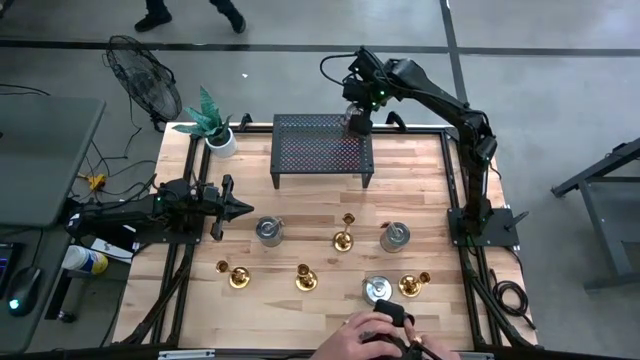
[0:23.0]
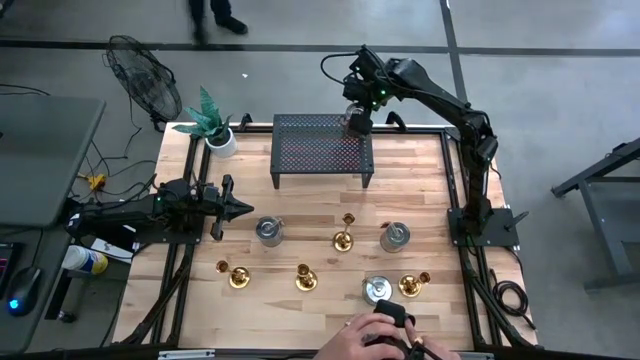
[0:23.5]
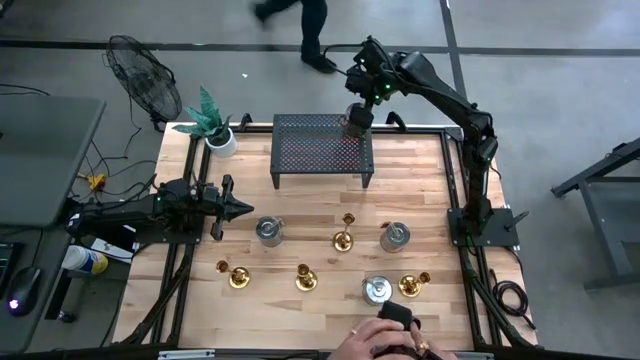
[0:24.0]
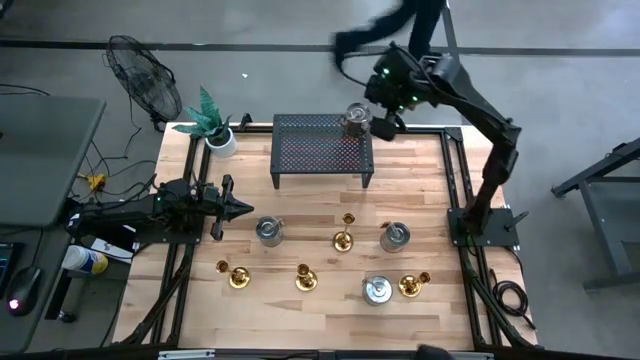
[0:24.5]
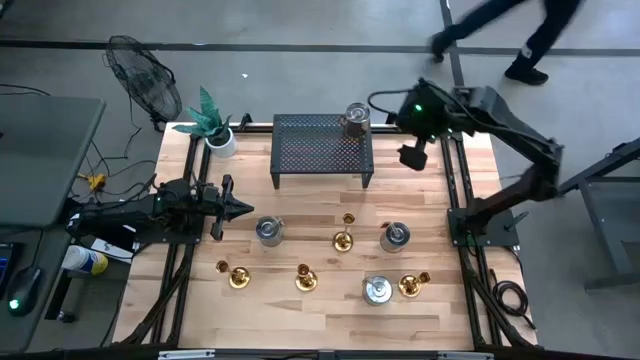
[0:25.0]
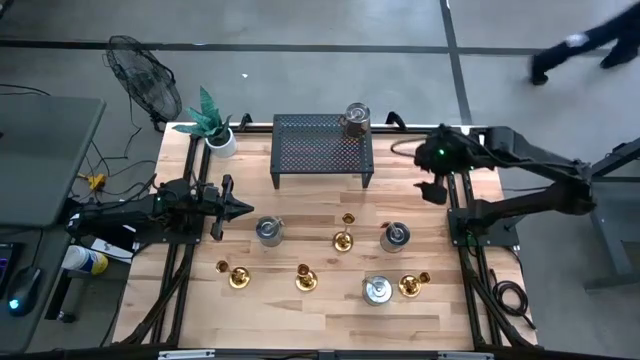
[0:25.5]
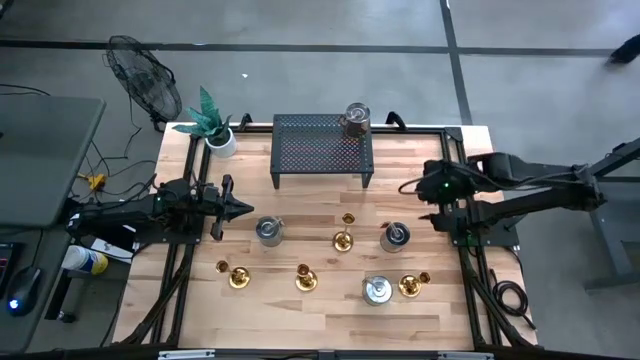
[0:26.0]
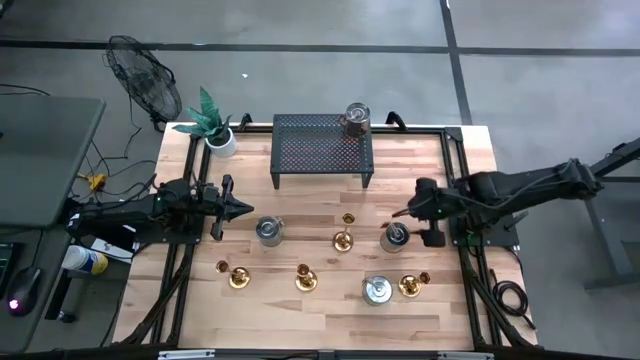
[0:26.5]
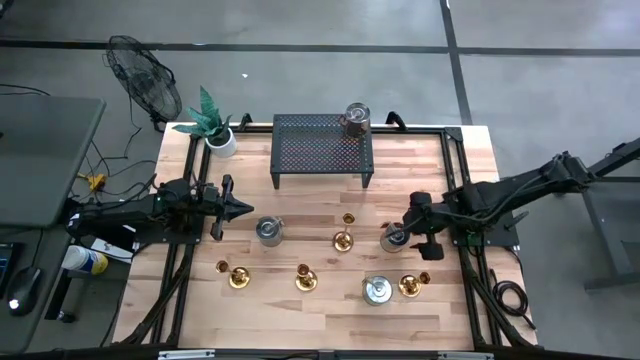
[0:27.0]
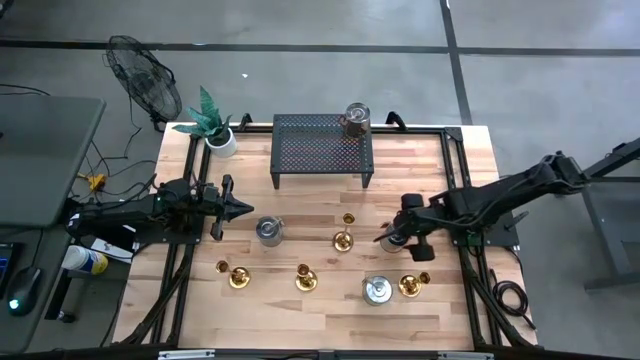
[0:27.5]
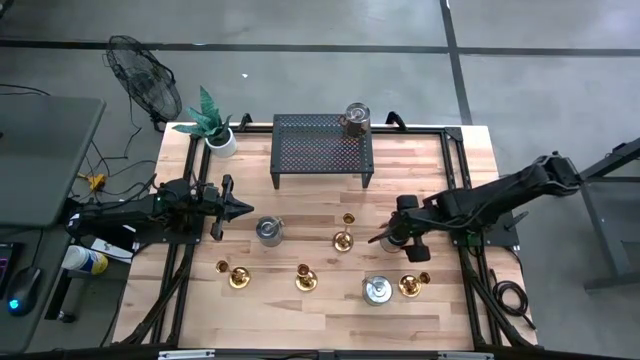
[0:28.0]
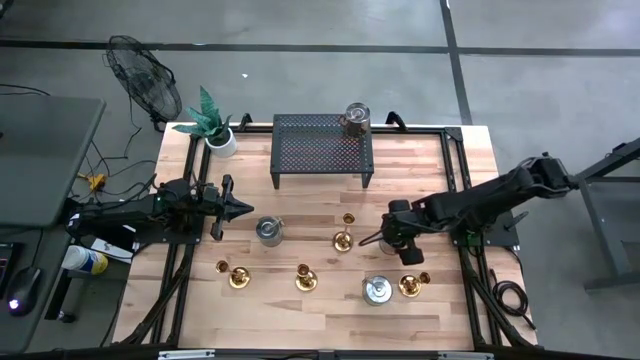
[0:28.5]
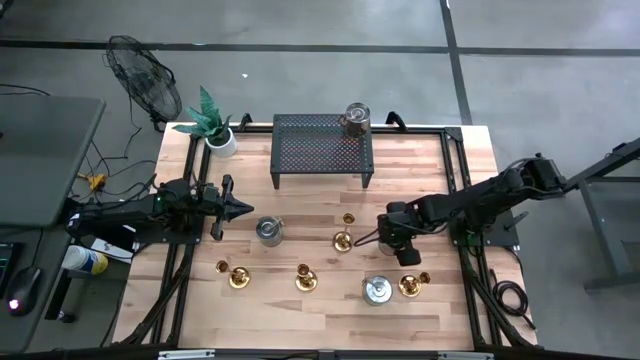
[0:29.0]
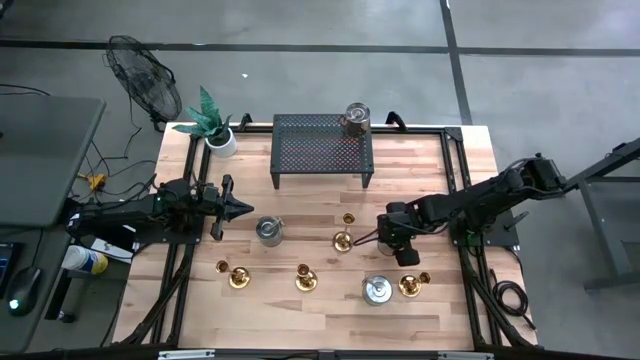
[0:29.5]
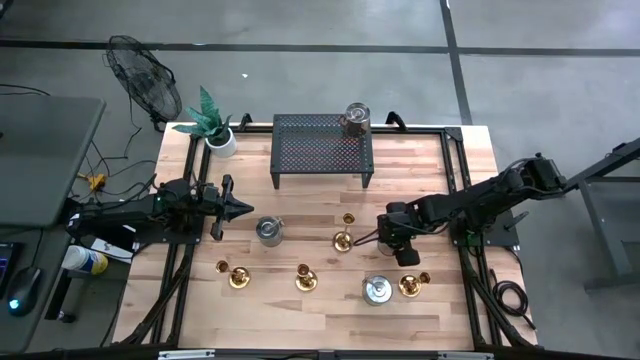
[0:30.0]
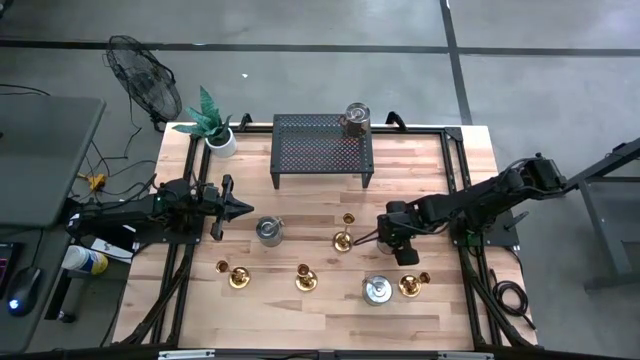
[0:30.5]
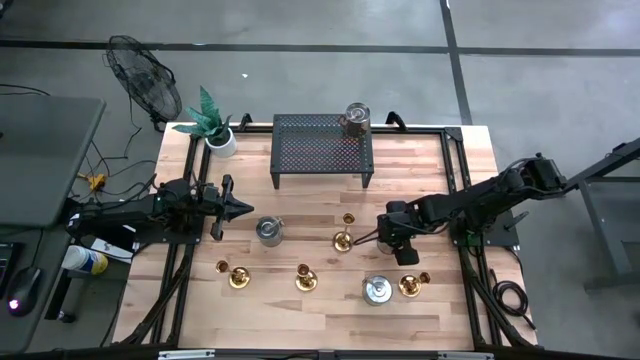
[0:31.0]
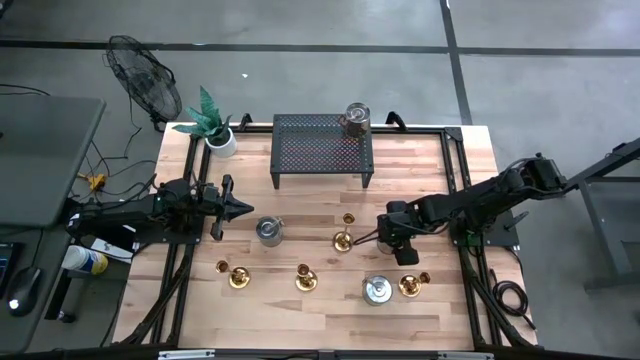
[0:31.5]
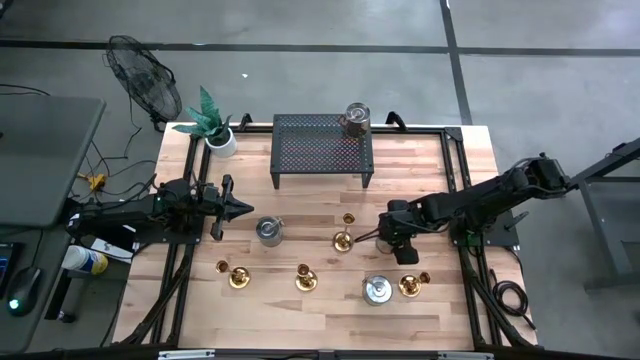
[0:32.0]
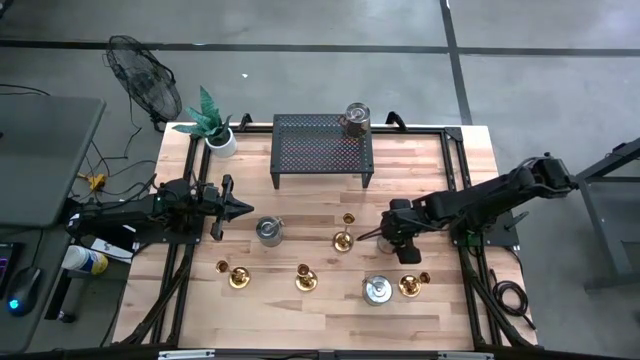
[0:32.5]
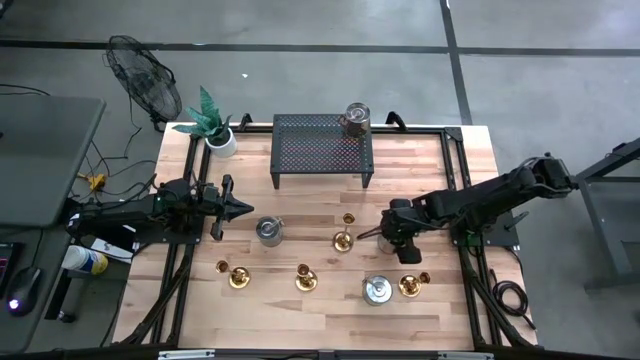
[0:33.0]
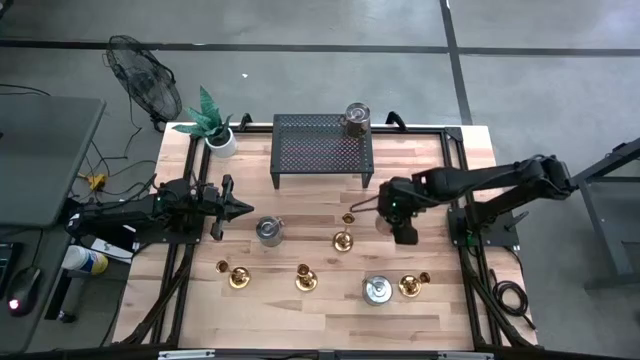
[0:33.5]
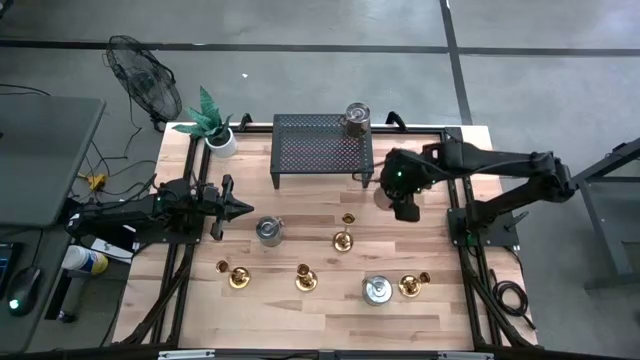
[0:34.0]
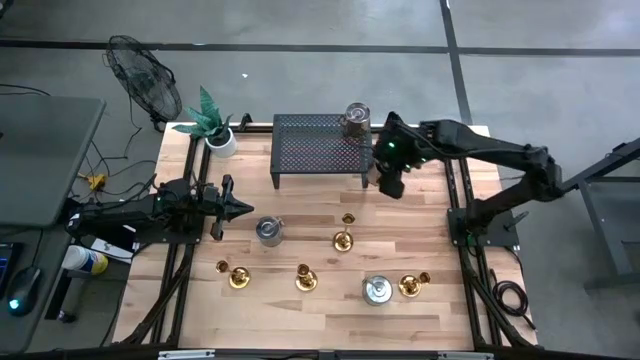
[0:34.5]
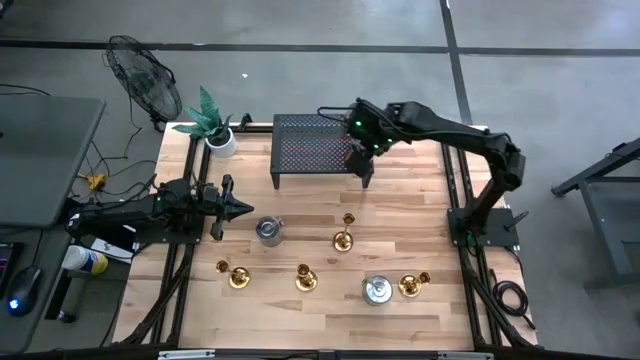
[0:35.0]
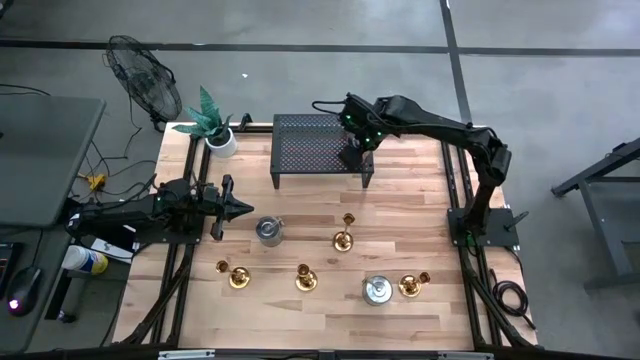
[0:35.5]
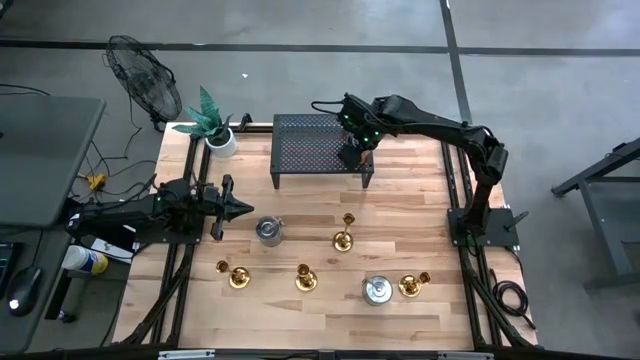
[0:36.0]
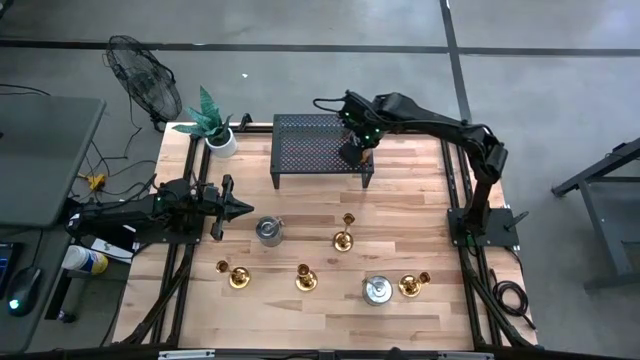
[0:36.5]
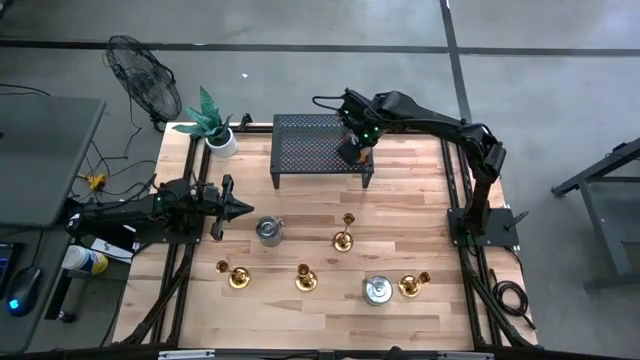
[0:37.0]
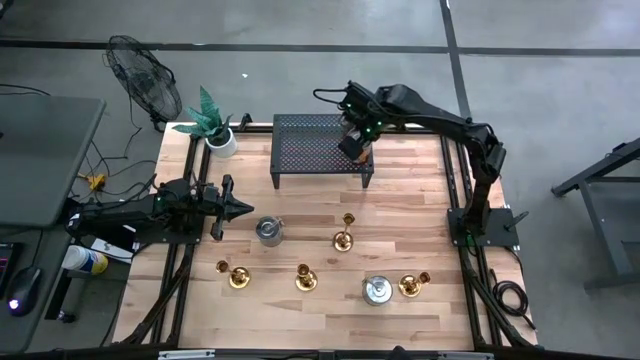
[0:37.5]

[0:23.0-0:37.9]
Task: Pick & Place candle stick holders
Put the orange scented candle on the shelf

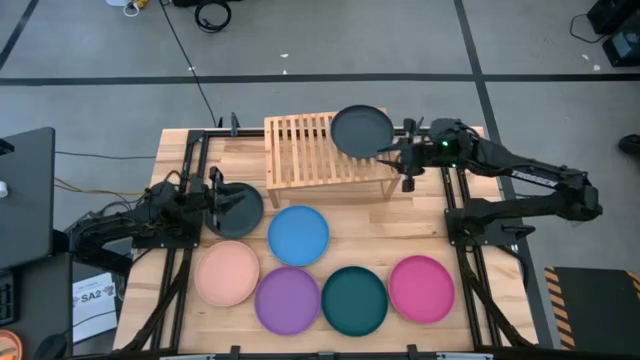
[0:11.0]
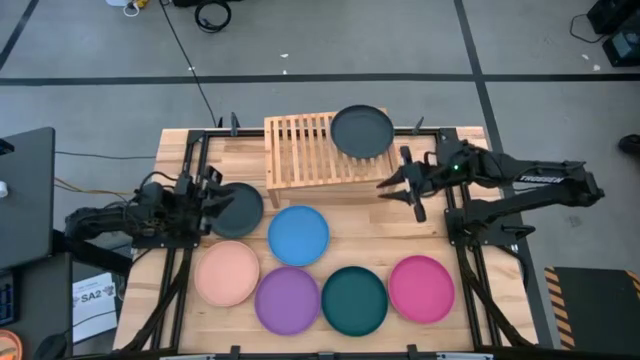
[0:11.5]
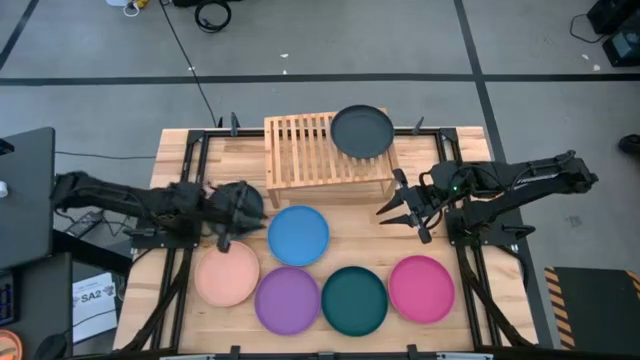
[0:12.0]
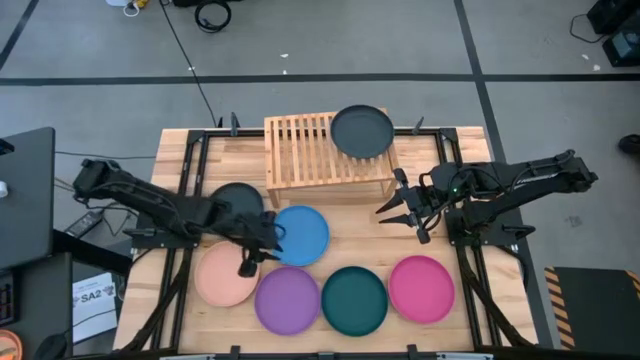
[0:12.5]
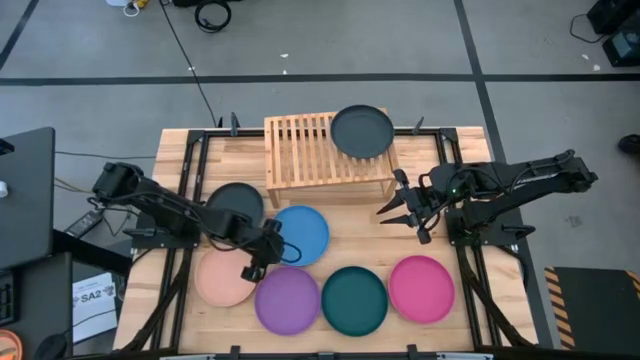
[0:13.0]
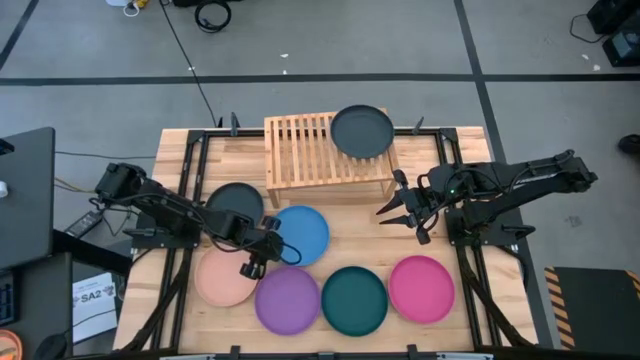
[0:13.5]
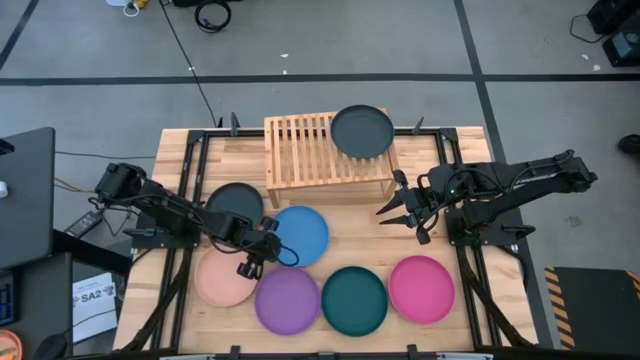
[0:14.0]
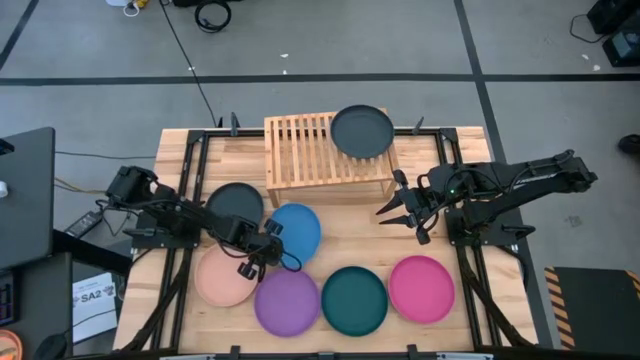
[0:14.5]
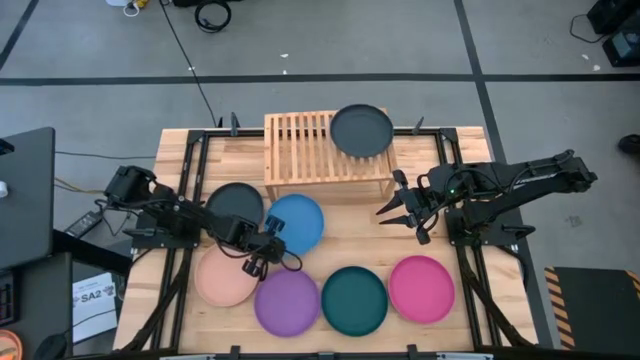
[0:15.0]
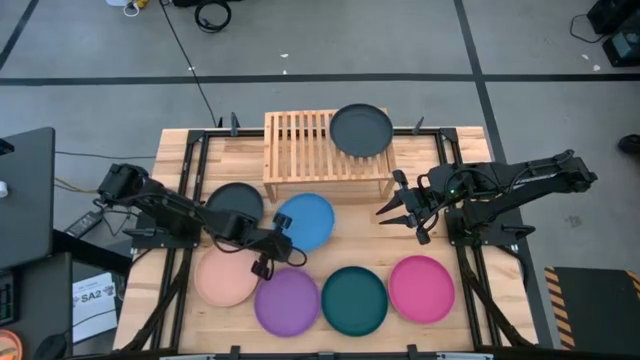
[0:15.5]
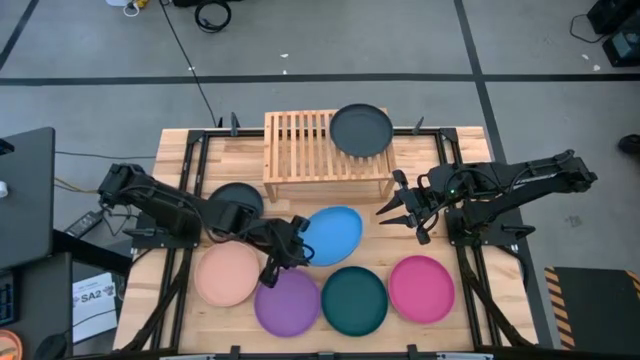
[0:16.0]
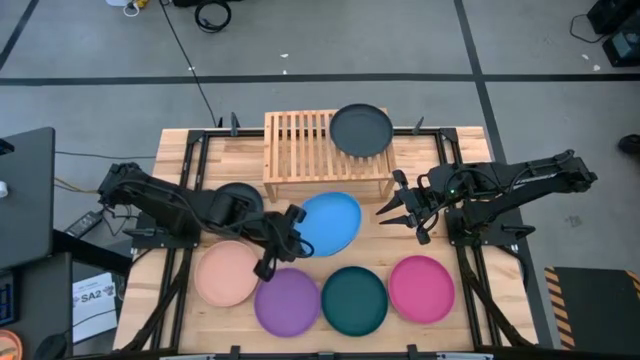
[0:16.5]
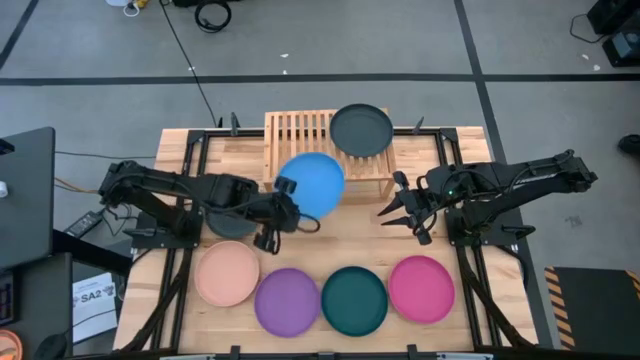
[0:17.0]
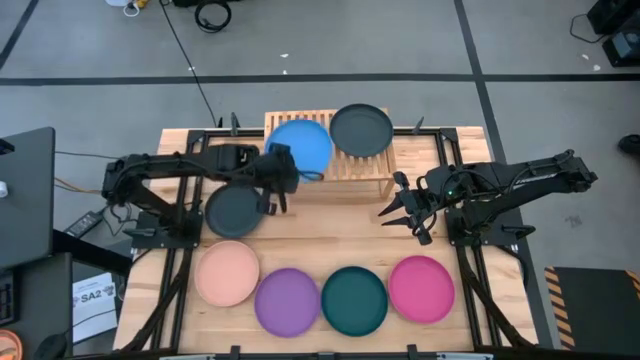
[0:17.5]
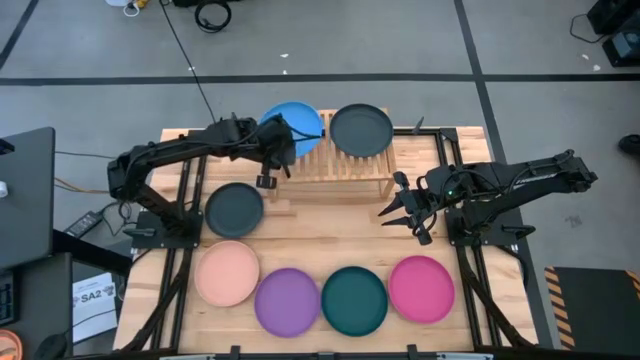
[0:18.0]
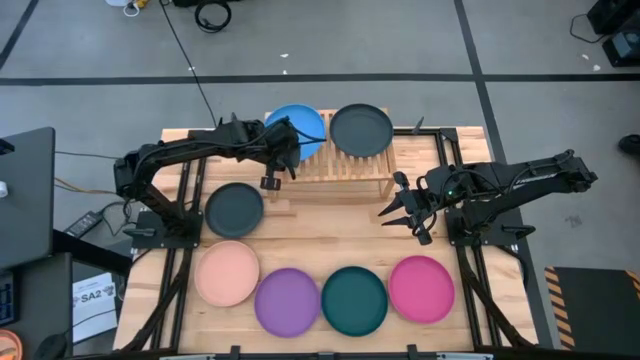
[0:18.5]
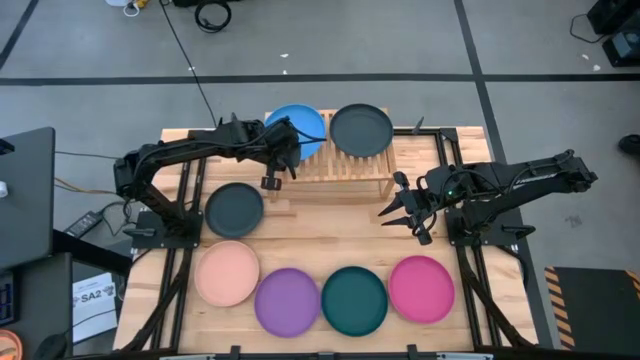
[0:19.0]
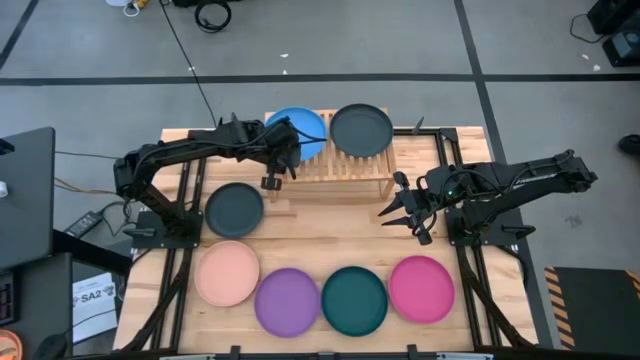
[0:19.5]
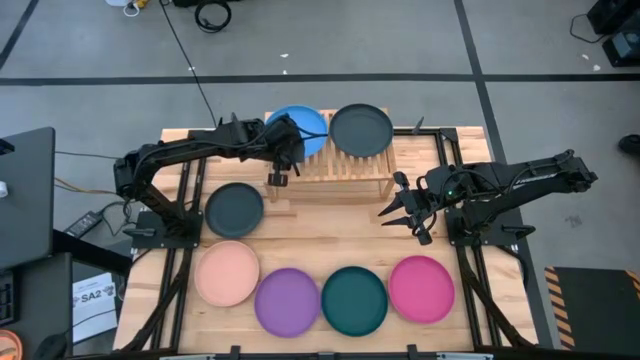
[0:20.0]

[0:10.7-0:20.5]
Task: Place and stack plates onto a shelf
Put the blue plate to the left on the shelf
